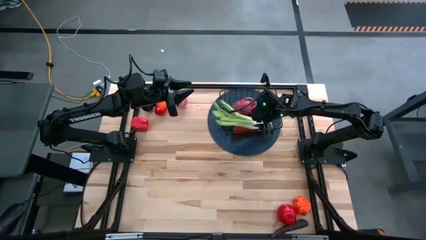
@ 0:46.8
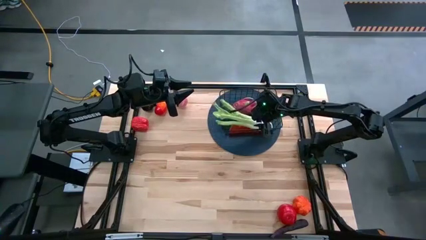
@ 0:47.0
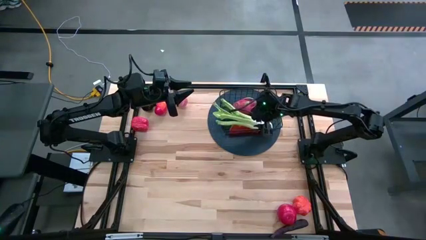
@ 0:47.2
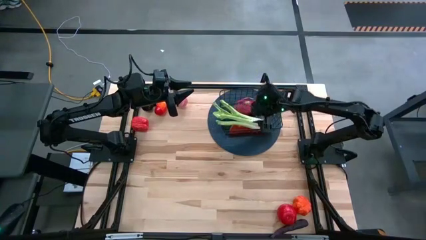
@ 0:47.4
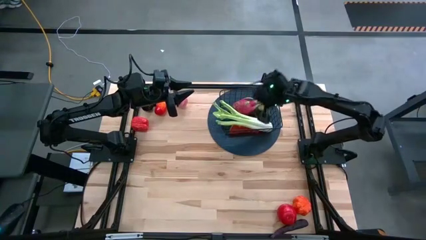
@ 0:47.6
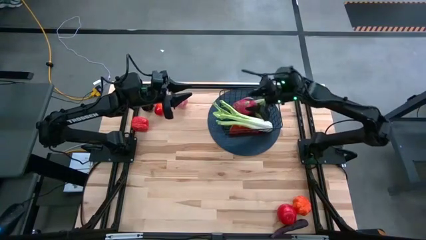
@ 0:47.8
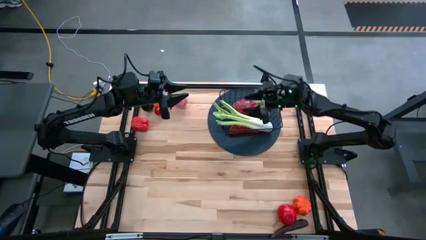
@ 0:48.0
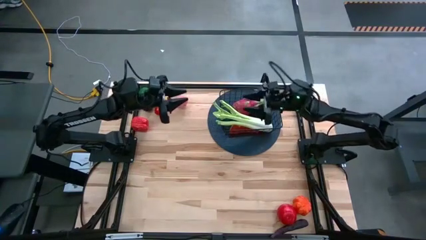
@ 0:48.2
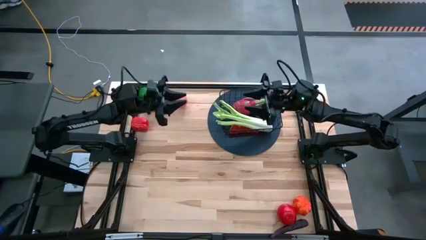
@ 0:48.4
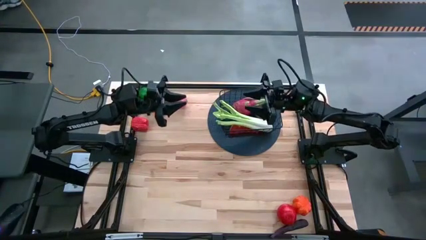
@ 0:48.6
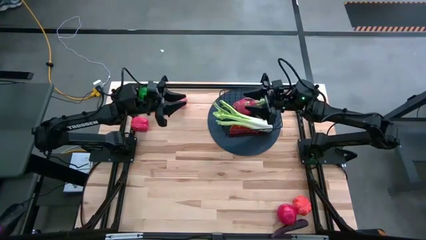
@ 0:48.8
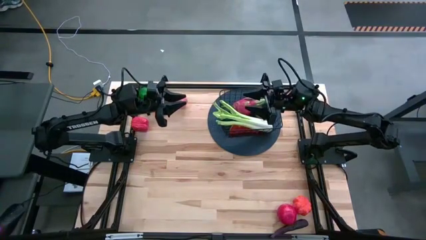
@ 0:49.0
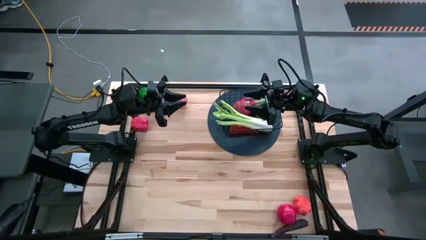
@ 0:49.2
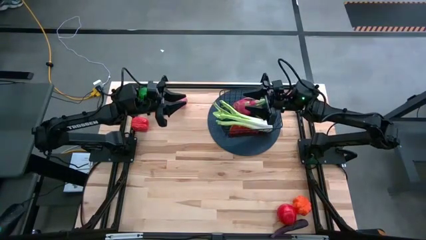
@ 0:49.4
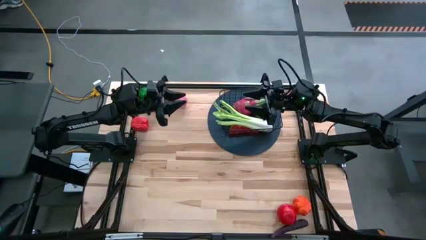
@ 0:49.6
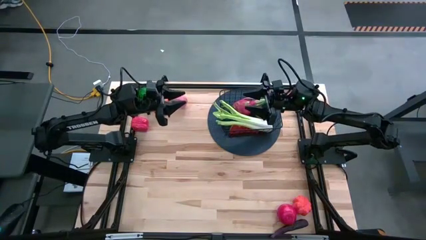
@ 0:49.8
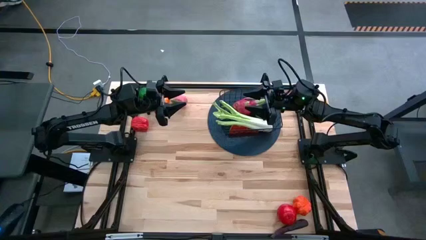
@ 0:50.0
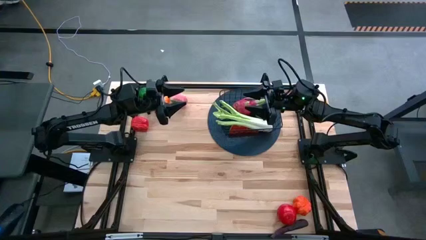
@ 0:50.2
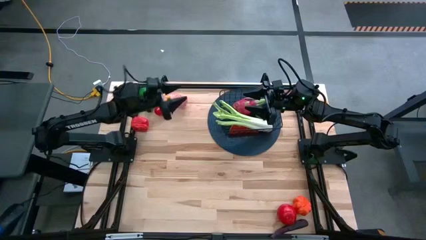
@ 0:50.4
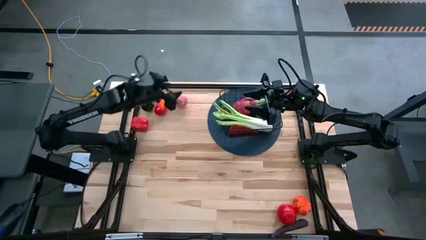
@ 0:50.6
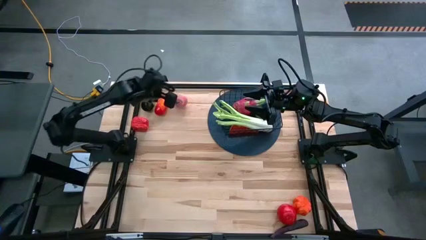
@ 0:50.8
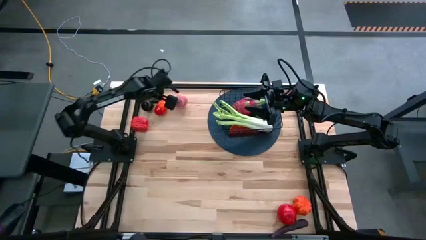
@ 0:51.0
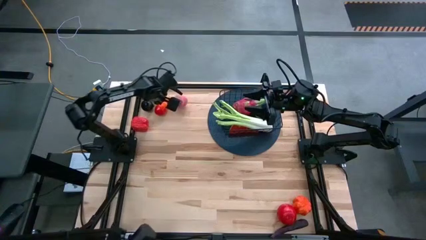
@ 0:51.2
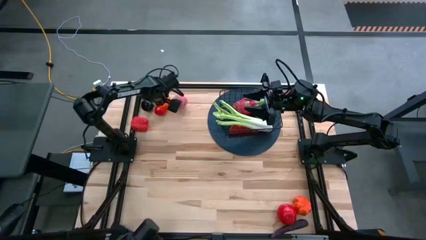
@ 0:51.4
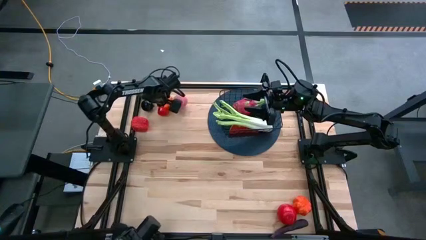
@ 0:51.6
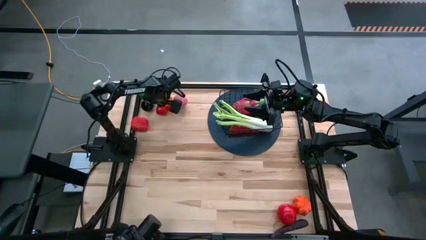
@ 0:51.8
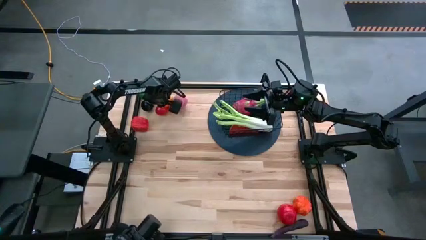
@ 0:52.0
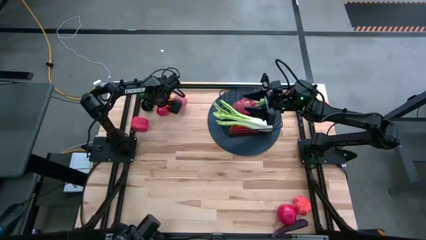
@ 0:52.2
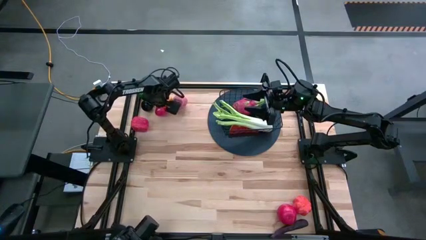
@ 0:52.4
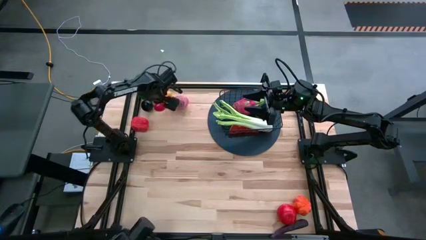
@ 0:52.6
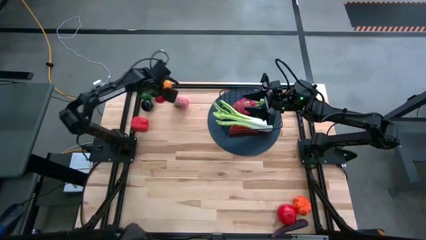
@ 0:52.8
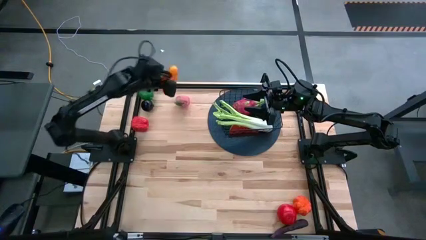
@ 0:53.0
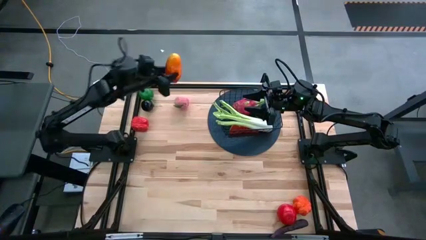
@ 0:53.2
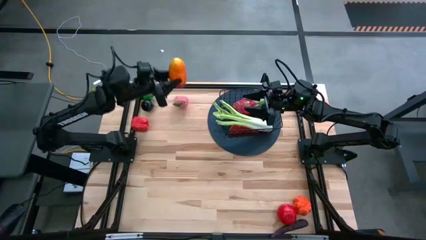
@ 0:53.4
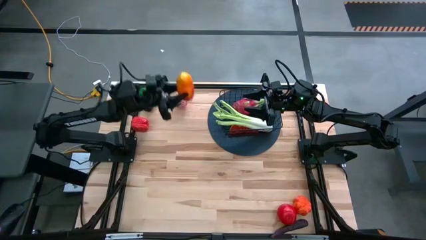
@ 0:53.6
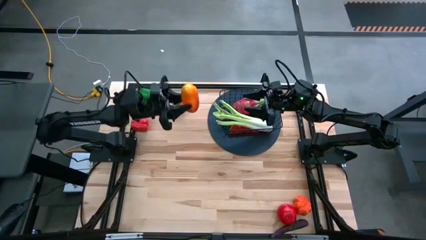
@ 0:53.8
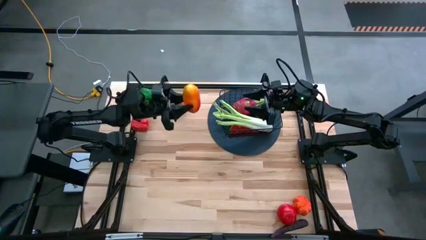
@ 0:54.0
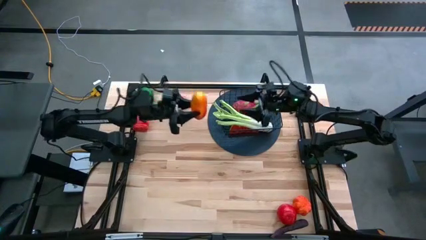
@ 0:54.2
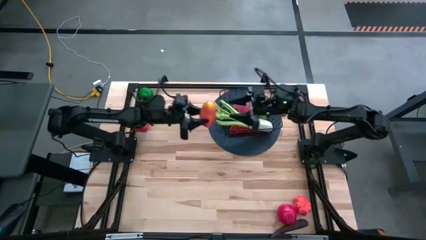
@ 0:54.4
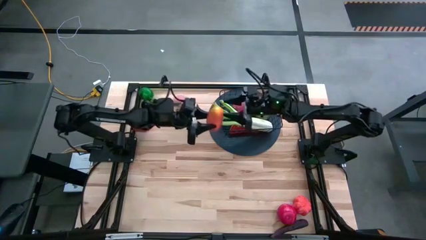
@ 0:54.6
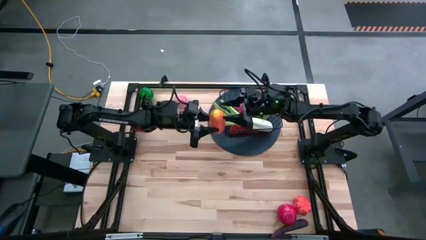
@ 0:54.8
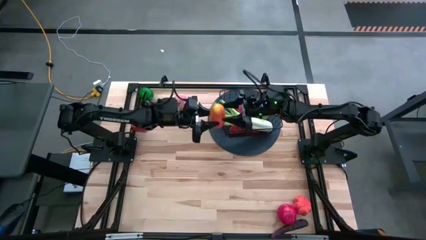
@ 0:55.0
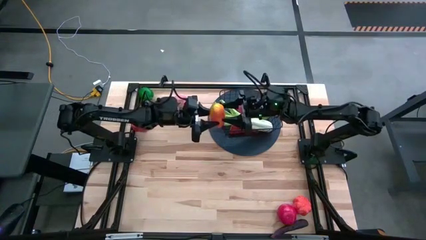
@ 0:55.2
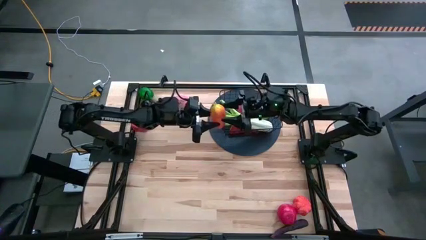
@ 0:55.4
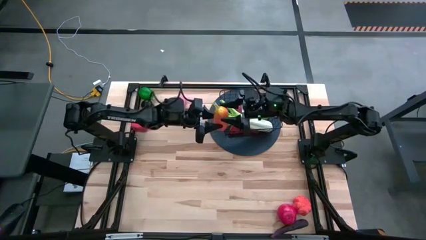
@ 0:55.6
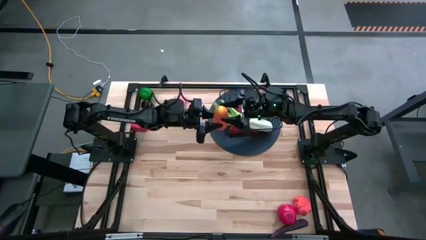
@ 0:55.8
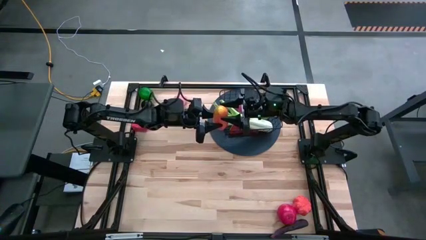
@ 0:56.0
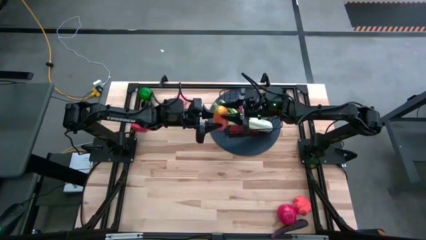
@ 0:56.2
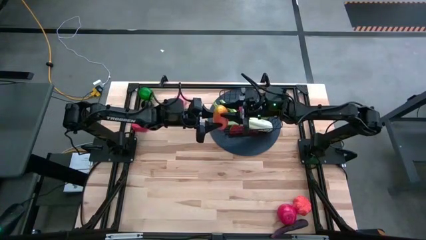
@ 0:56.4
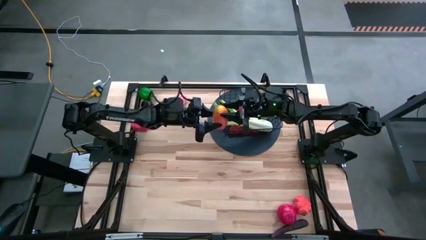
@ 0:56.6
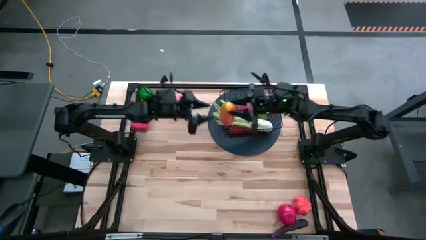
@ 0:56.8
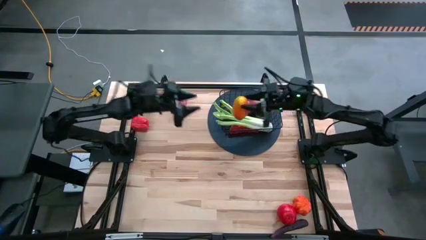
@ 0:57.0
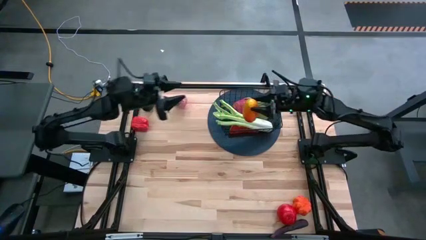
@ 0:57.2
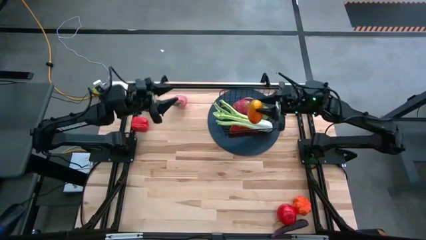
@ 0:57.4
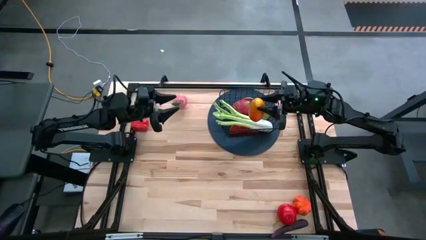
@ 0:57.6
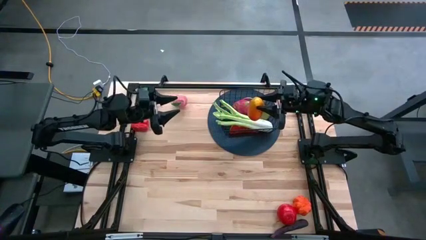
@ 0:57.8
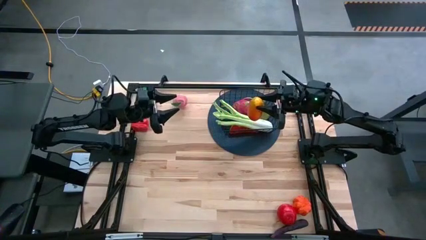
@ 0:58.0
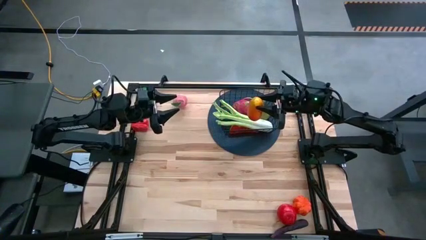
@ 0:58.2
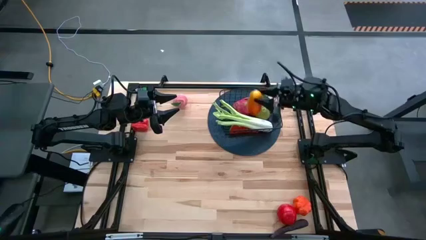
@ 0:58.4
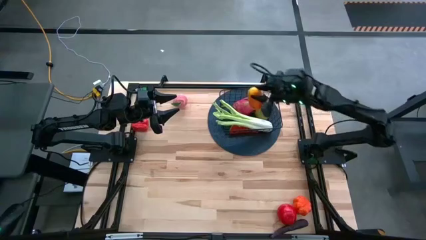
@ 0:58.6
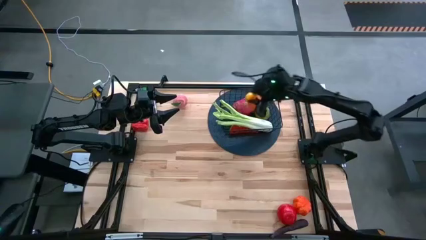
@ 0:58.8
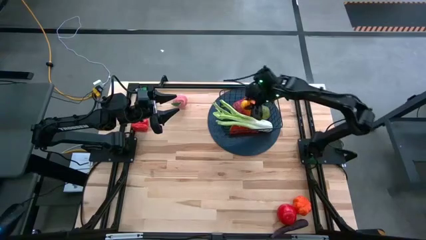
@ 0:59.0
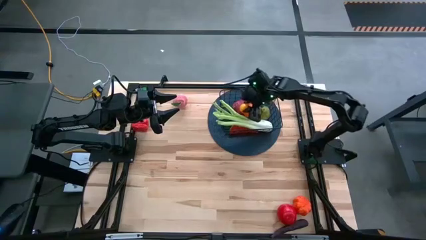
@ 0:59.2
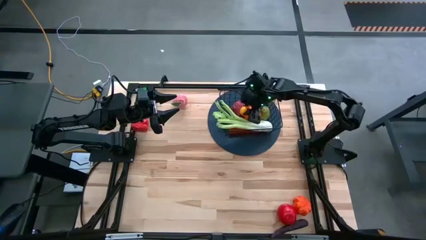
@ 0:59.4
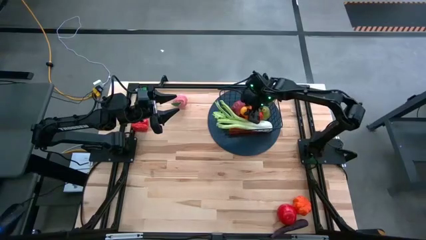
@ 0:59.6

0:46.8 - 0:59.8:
Task: Build produce basket
Put the mango into the black wire basket
